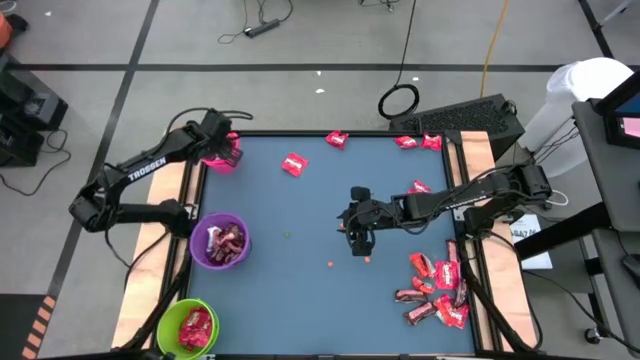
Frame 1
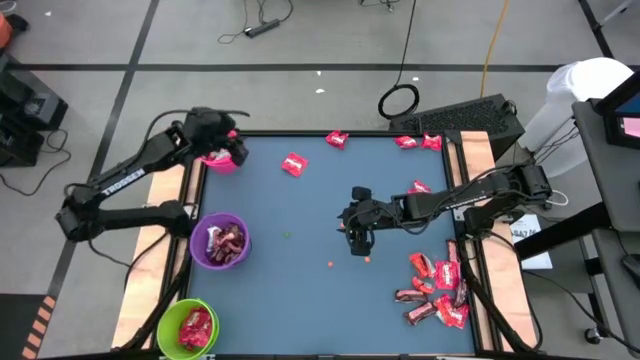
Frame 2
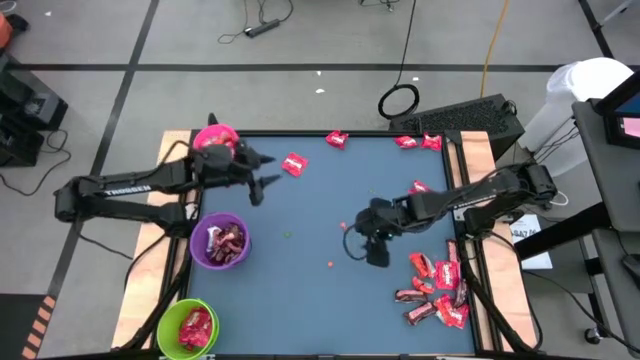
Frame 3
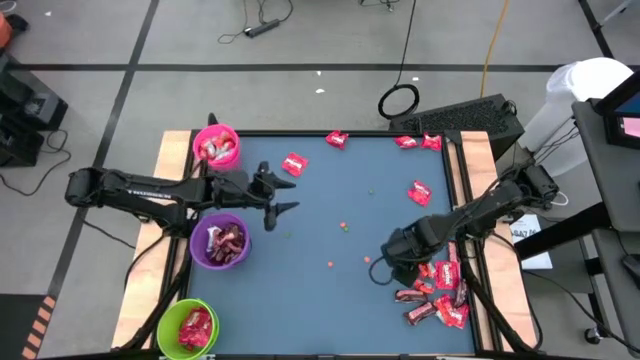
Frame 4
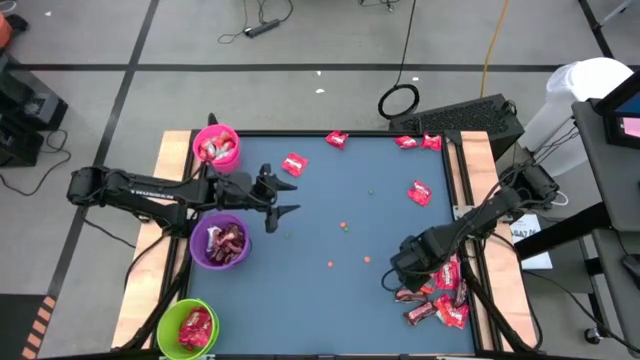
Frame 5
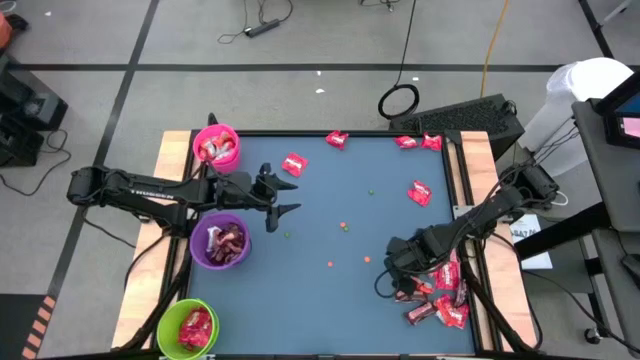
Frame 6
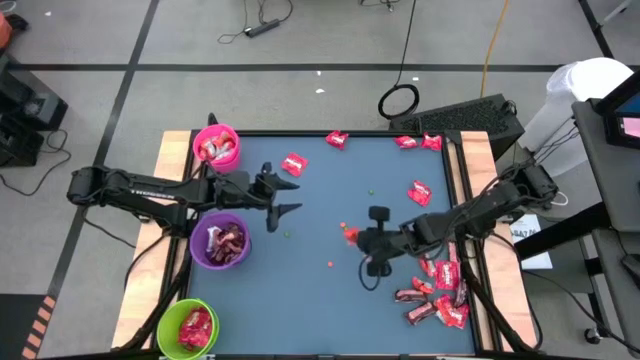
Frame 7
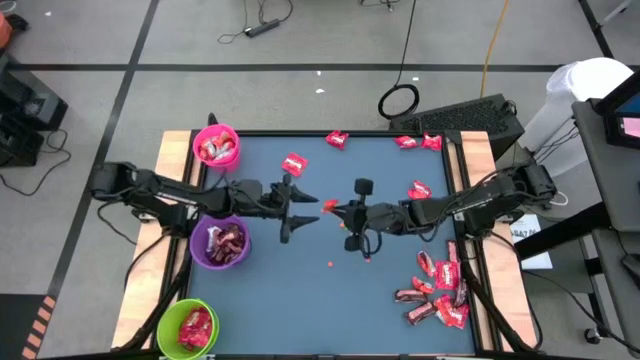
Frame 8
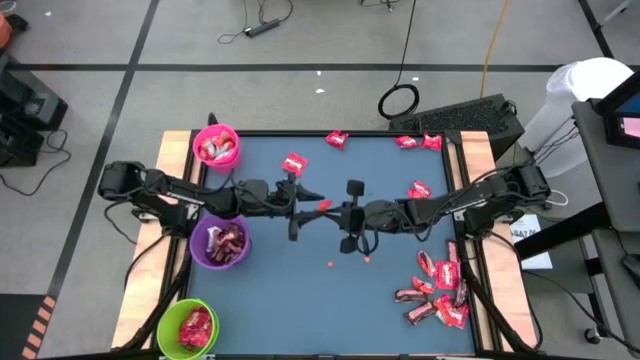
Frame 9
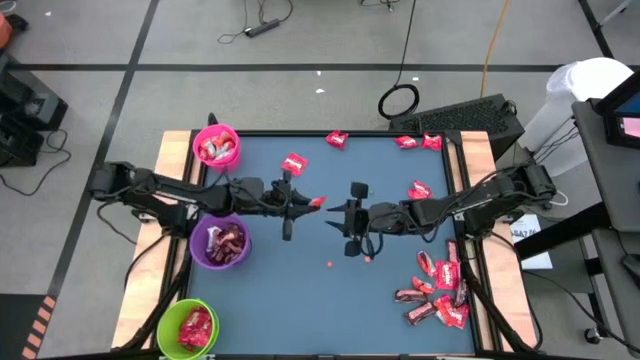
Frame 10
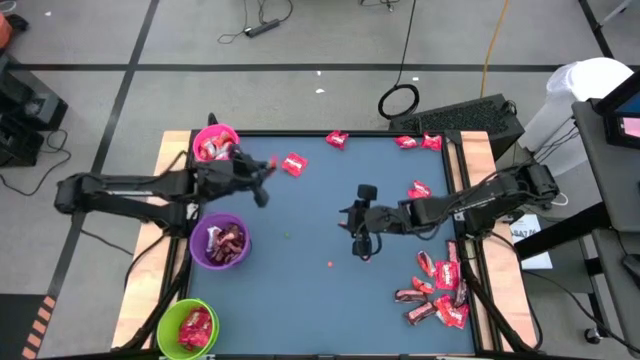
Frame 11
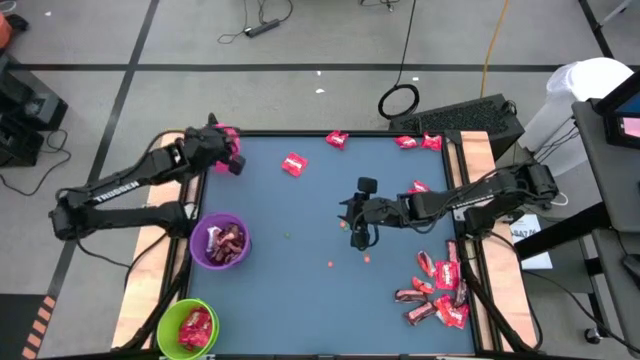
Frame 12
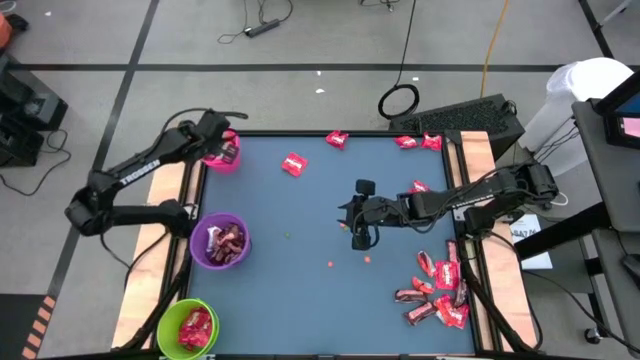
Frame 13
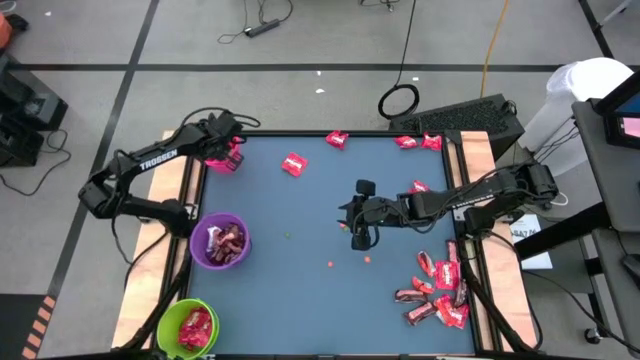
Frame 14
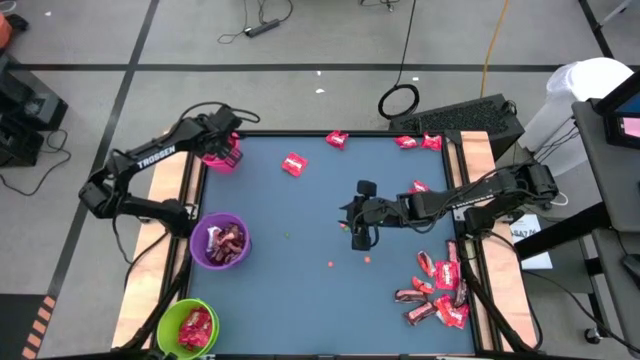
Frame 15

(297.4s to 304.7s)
Task: Organize candy in baskets
Put the orange chocolate into the pink bucket

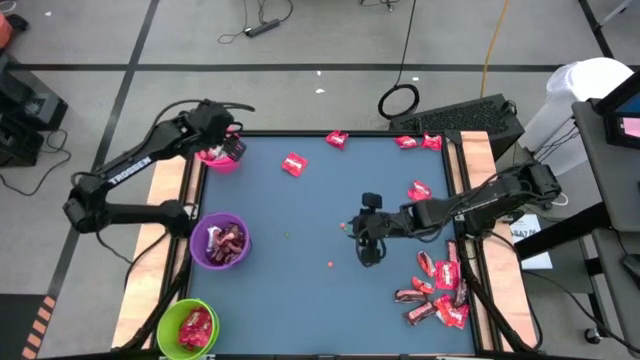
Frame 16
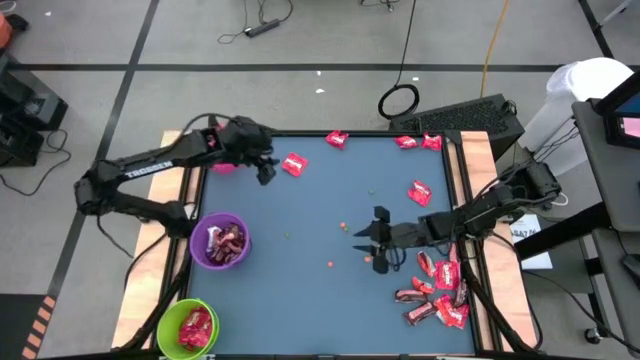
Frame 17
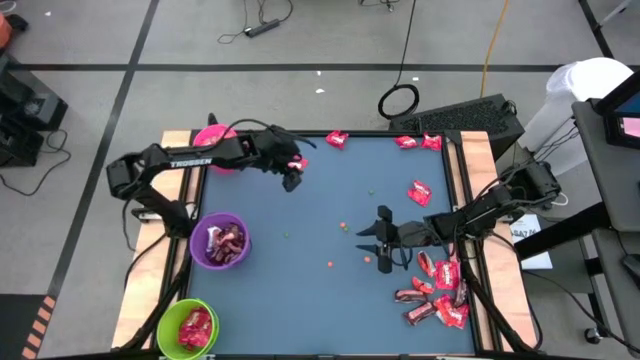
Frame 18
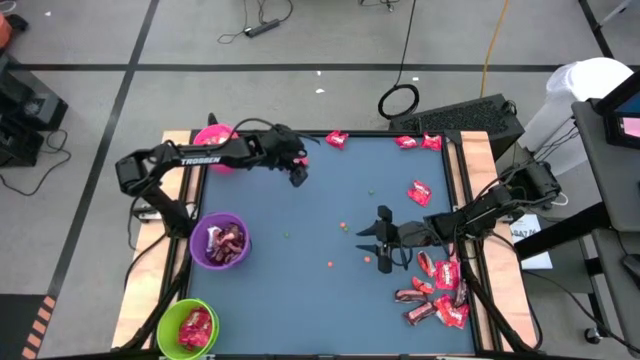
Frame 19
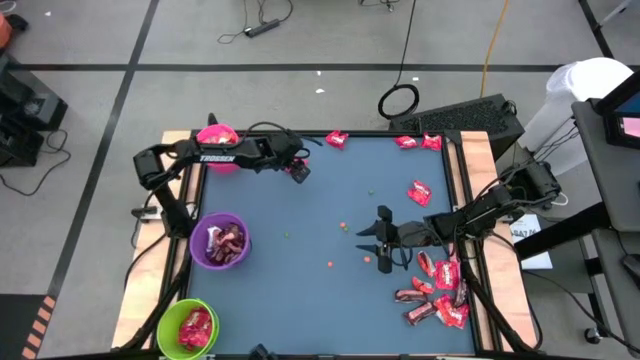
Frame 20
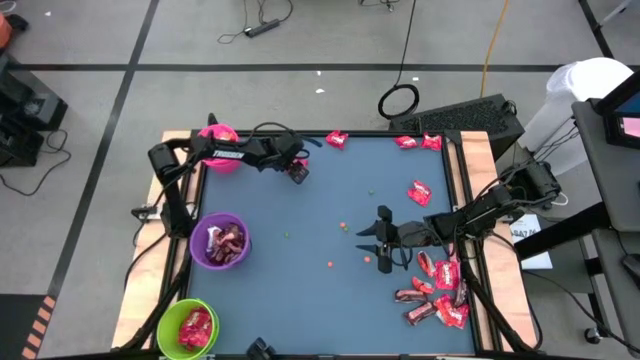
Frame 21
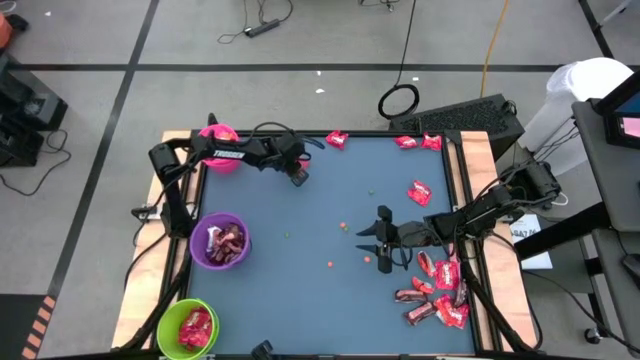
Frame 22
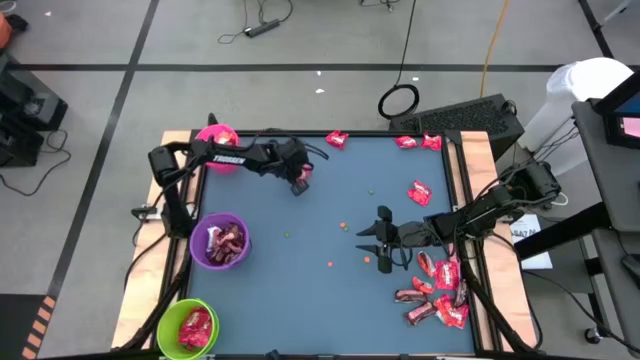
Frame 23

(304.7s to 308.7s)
Put the red candy into the green bucket

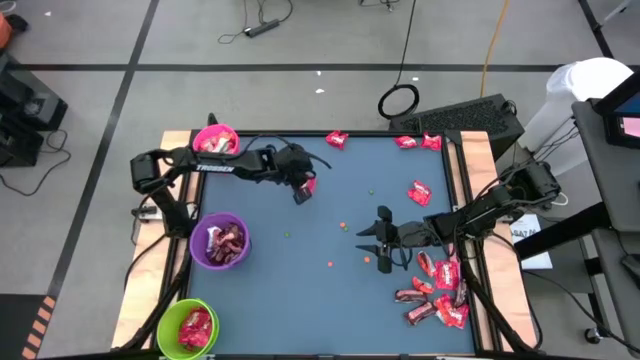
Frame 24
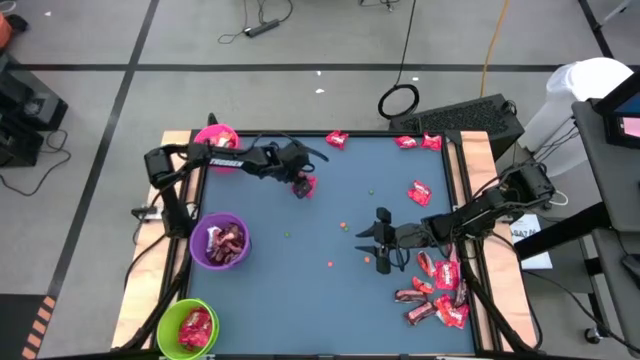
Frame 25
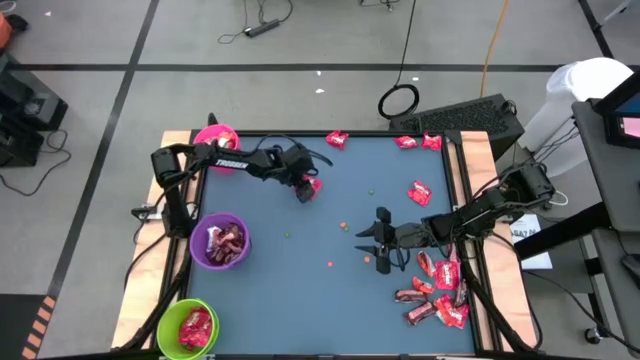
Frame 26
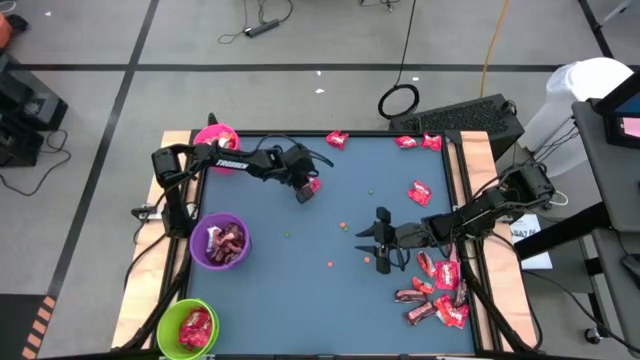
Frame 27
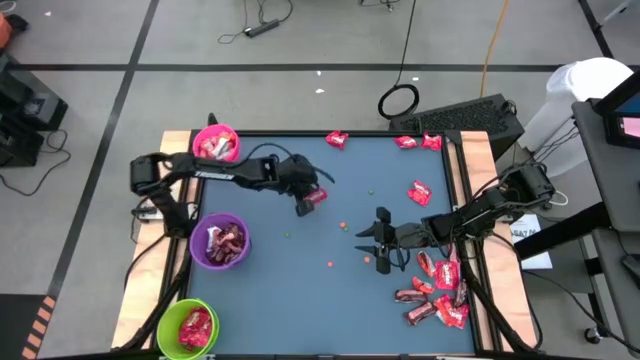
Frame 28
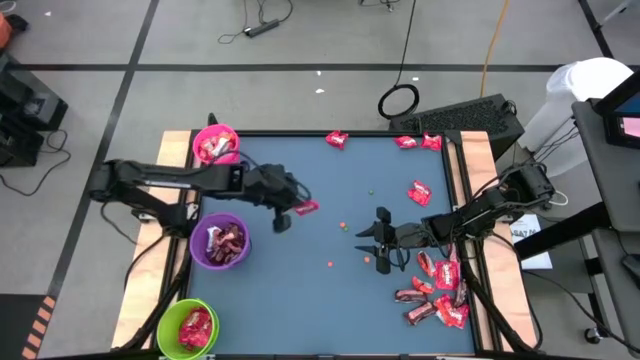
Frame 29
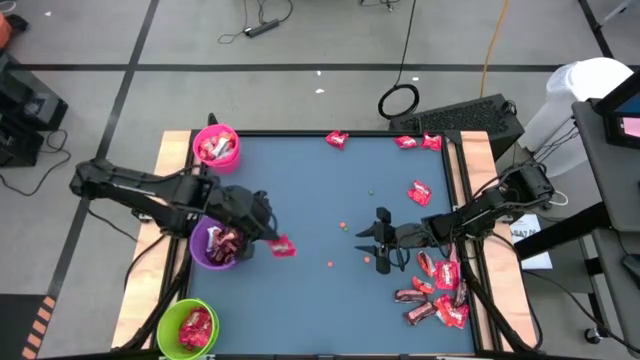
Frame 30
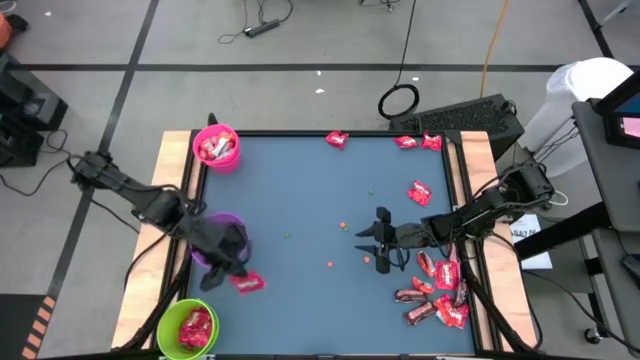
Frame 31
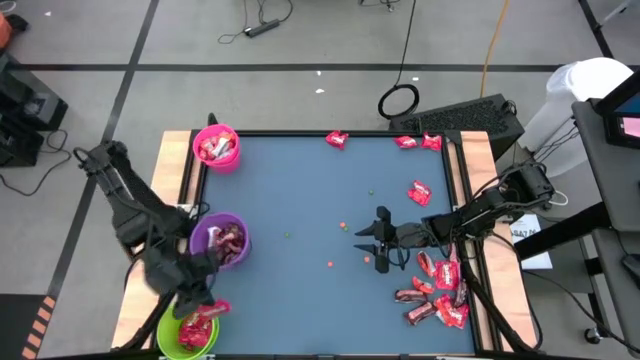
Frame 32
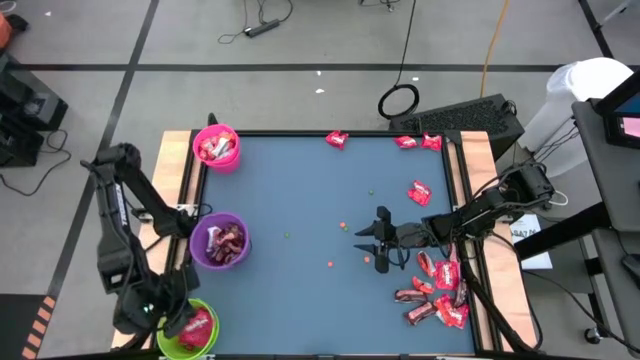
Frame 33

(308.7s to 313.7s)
Put the red candy into the green bucket
